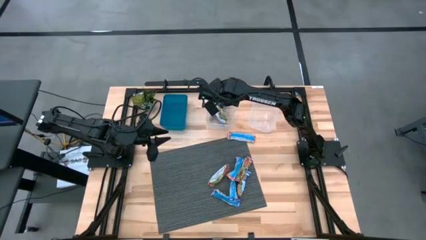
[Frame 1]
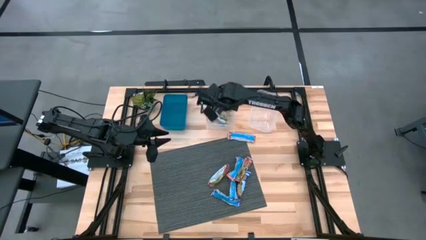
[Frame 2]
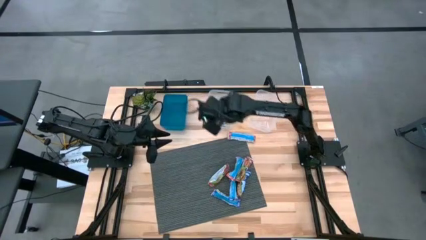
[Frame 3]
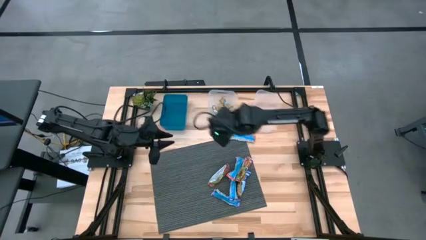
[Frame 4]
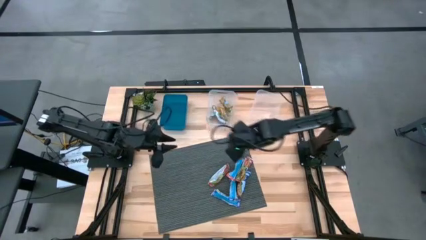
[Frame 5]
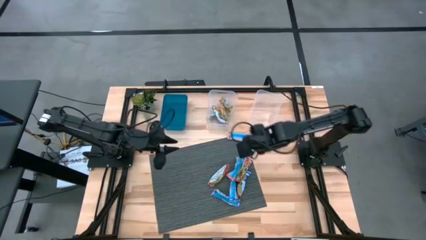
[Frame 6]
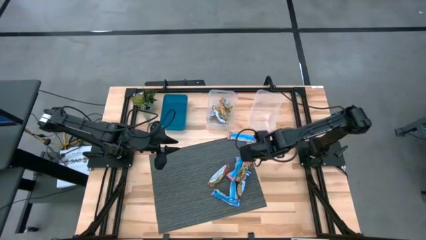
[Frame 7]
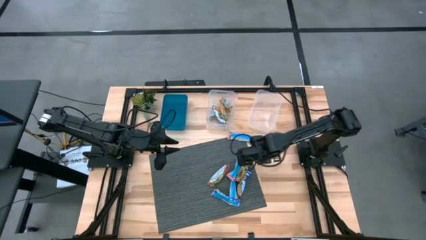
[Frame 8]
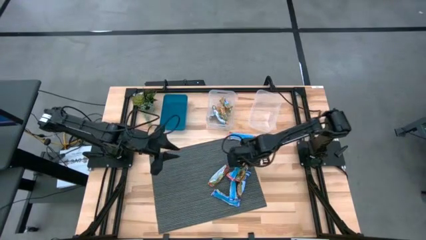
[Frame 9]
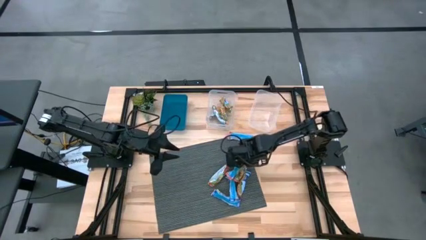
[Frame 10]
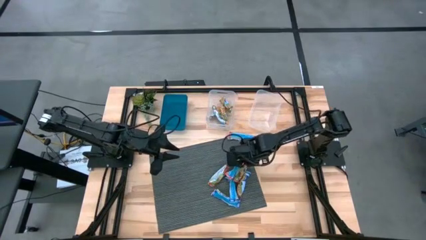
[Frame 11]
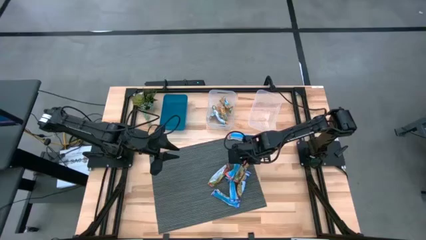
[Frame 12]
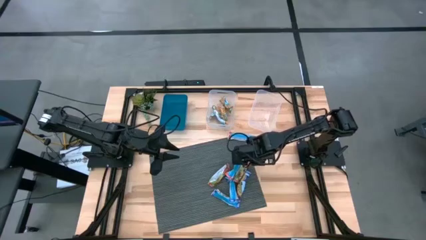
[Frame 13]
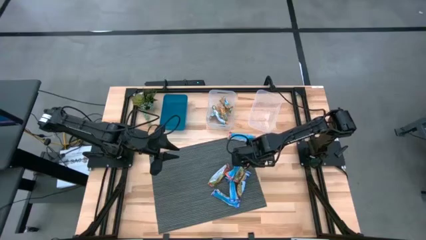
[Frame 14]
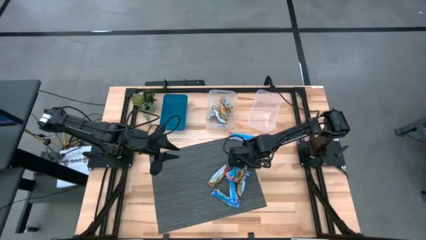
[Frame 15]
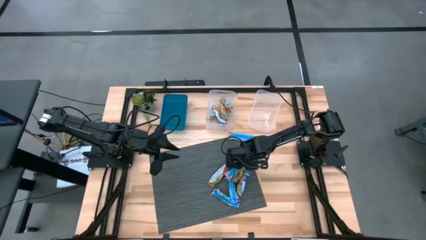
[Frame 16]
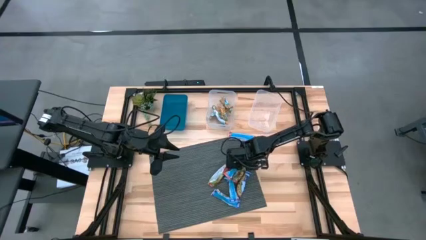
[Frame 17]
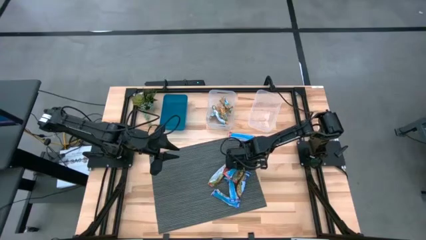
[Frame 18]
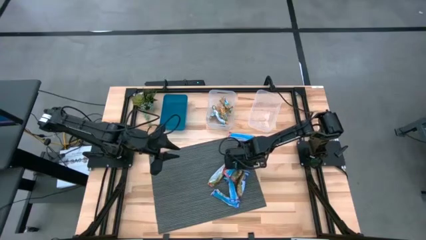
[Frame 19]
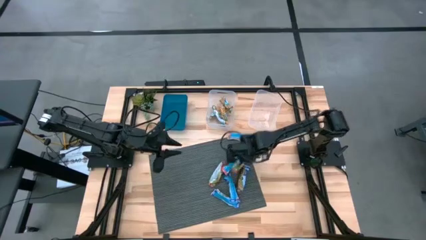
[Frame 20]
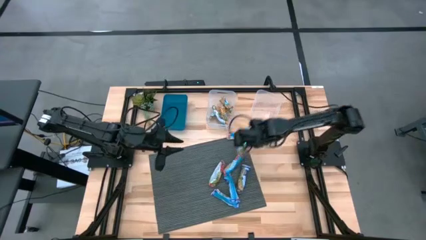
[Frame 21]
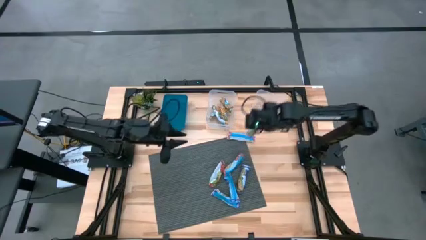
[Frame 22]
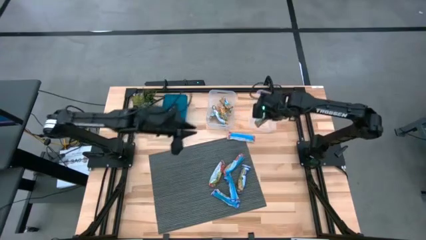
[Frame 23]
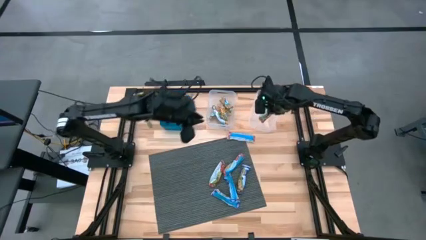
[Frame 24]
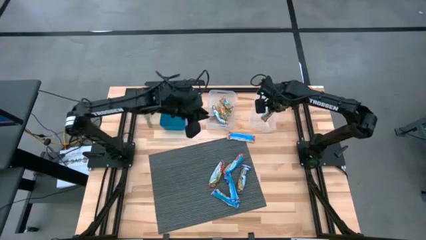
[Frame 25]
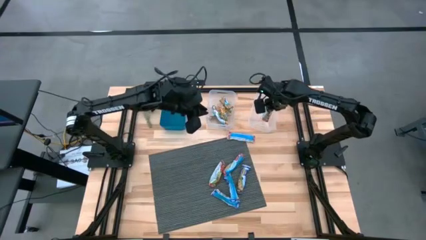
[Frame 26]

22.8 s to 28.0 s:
Task: Pick and place Granola Bars by type
Put the red granola bar into the right transparent bin

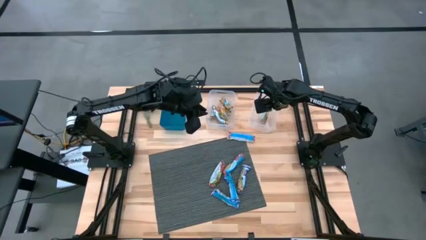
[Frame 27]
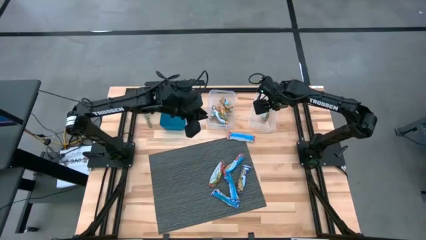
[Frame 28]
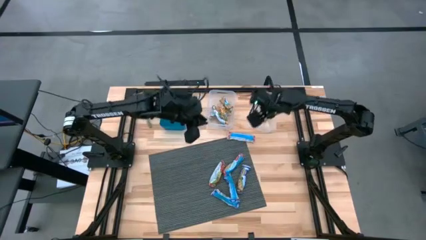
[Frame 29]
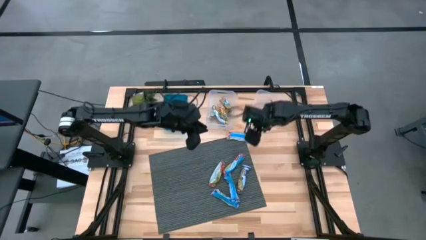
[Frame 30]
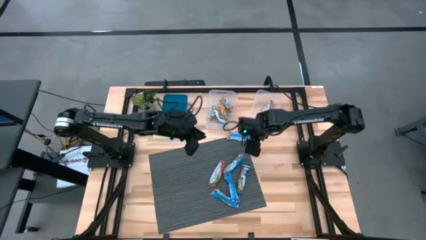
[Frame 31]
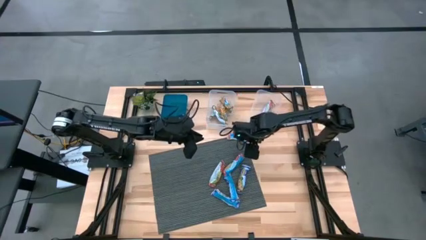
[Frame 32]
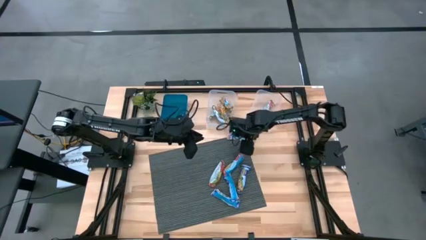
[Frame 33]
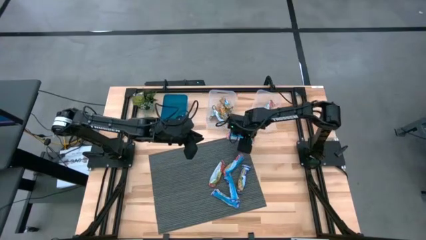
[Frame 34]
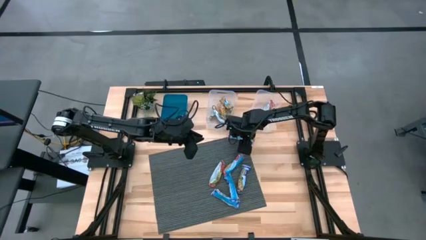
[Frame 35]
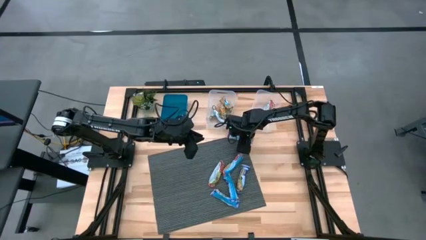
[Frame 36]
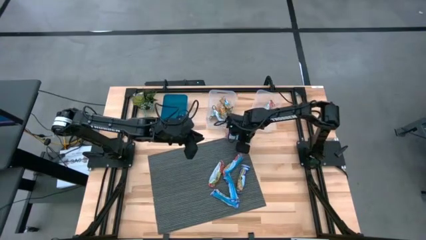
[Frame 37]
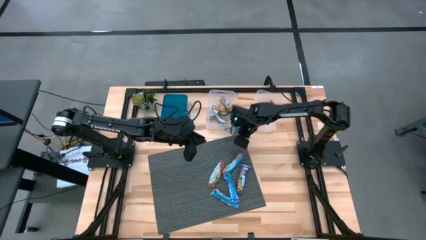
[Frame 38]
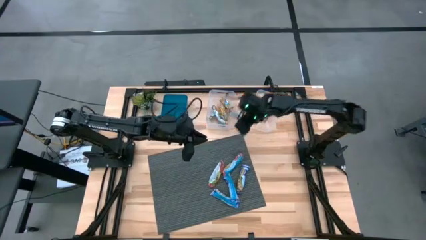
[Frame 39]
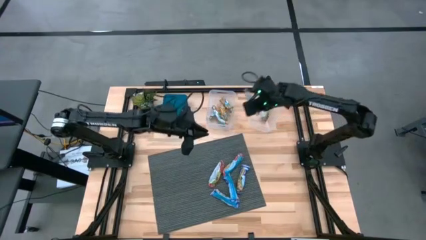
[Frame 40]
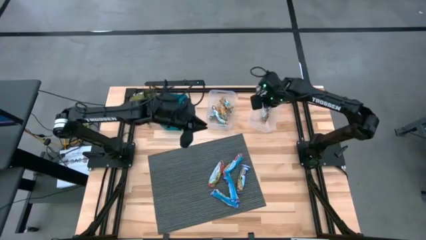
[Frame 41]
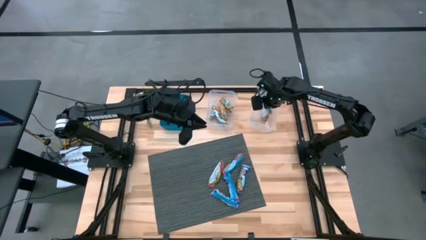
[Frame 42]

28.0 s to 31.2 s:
Put the red granola bar into the right transparent bin

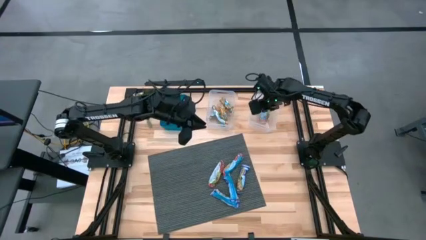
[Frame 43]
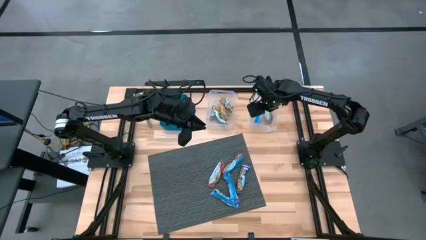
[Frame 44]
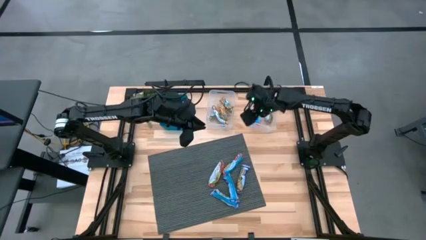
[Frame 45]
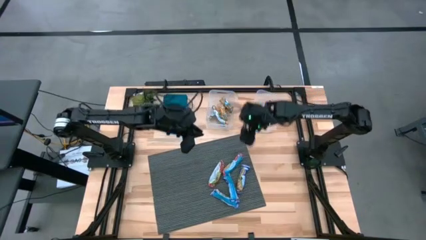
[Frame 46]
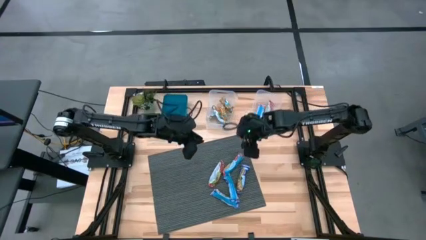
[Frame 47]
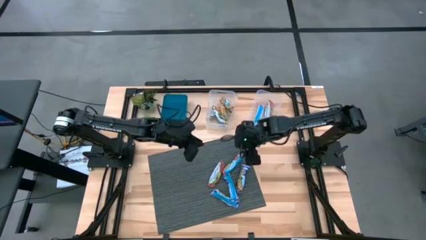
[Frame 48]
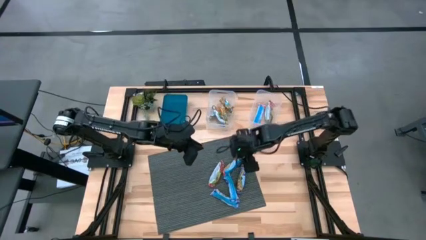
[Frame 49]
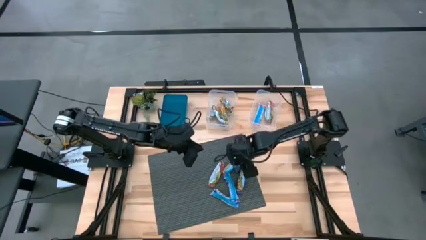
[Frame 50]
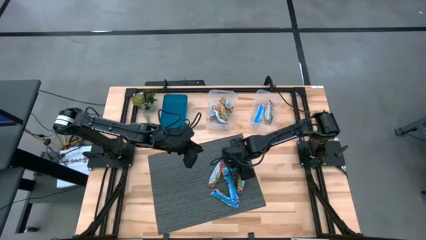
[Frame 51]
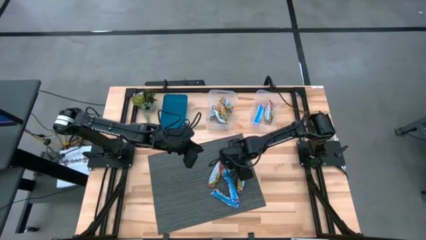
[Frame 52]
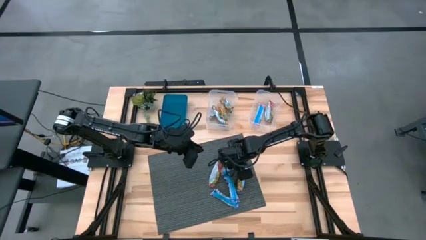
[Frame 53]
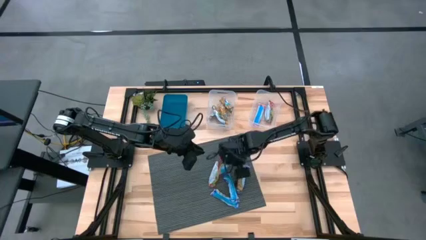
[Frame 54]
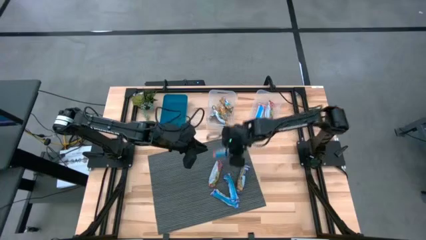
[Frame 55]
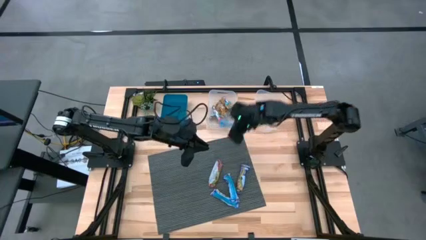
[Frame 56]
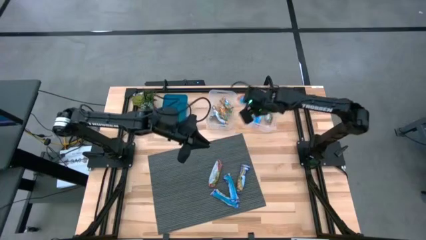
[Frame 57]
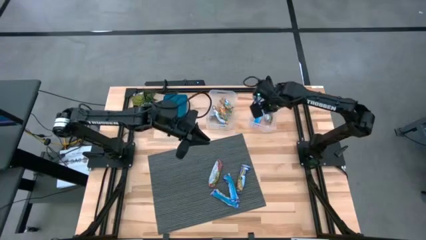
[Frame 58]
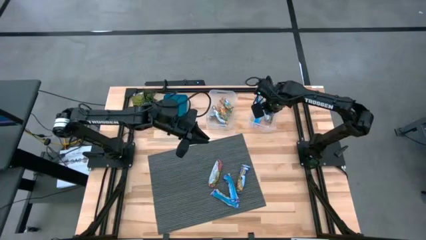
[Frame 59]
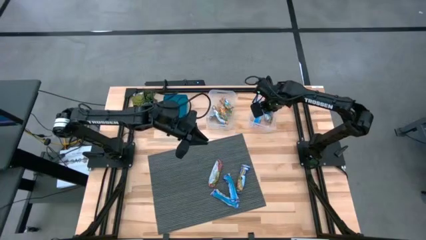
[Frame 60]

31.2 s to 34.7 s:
Put the red granola bar into the right transparent bin

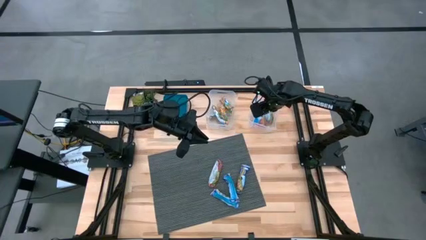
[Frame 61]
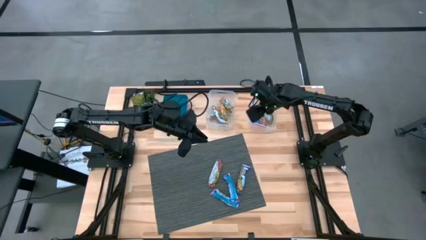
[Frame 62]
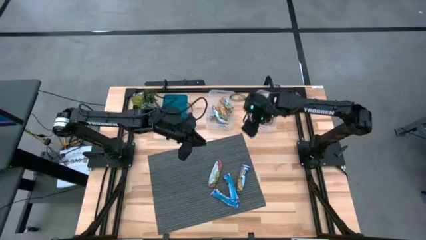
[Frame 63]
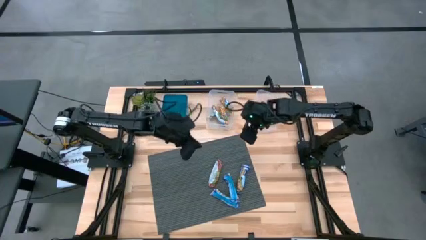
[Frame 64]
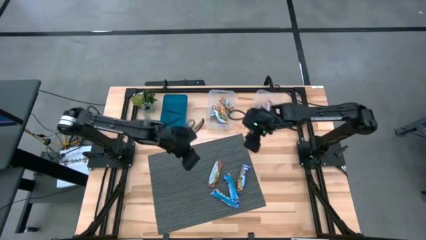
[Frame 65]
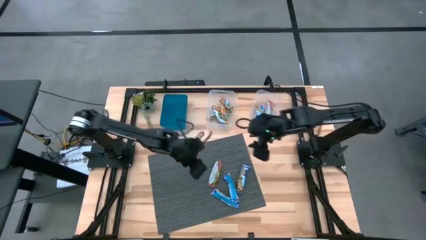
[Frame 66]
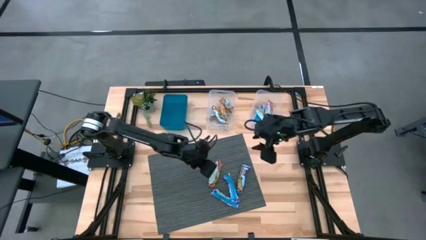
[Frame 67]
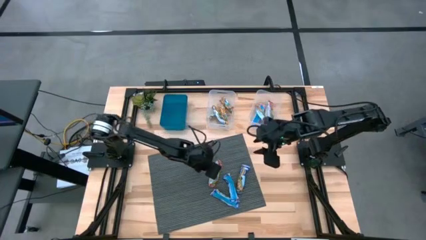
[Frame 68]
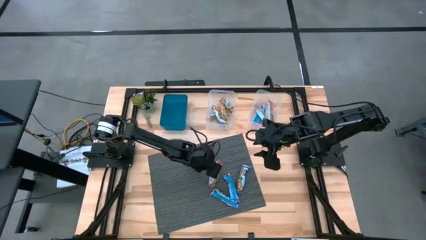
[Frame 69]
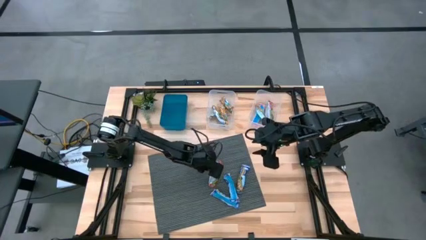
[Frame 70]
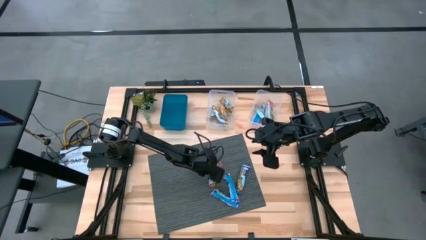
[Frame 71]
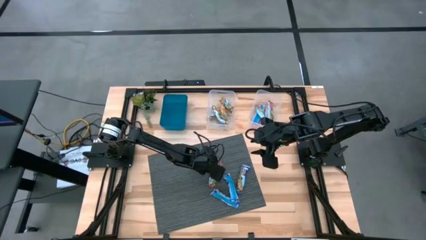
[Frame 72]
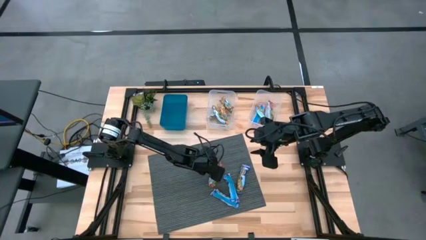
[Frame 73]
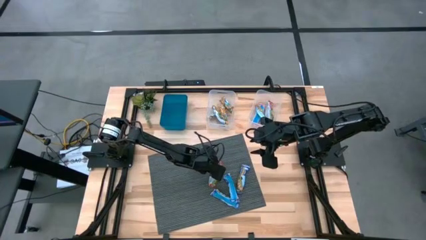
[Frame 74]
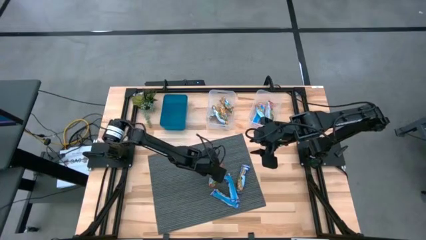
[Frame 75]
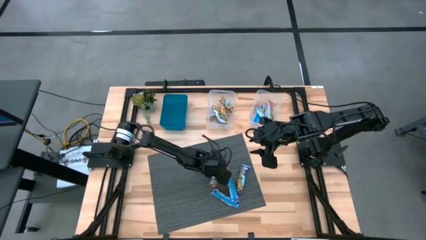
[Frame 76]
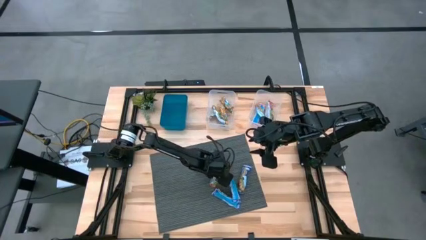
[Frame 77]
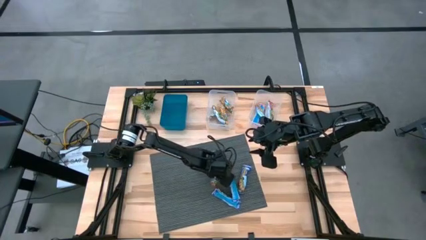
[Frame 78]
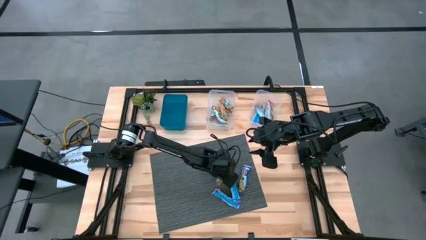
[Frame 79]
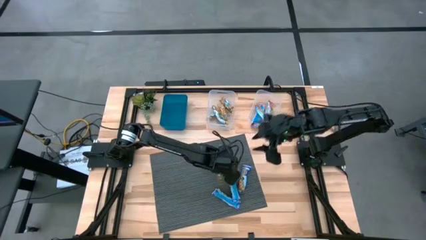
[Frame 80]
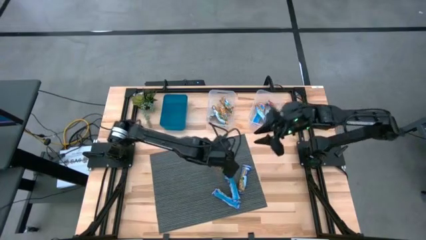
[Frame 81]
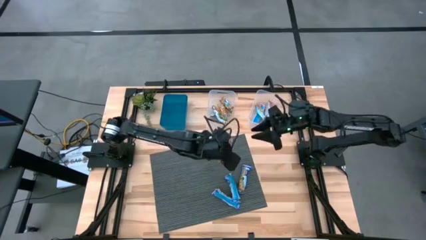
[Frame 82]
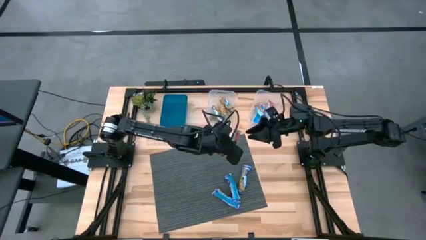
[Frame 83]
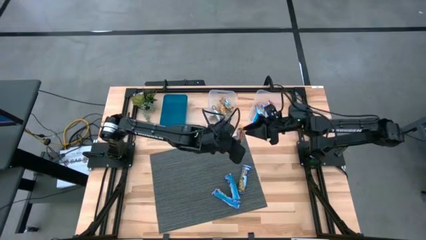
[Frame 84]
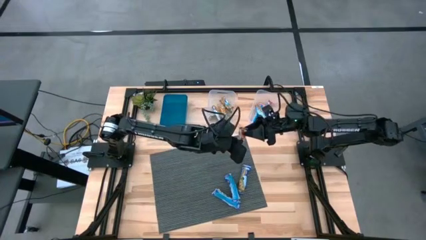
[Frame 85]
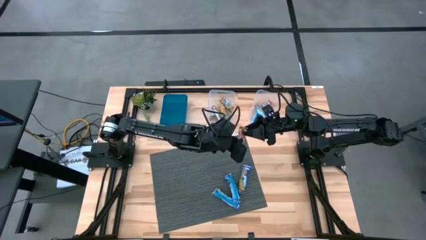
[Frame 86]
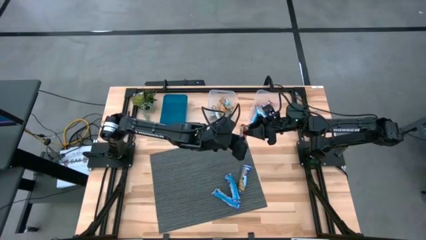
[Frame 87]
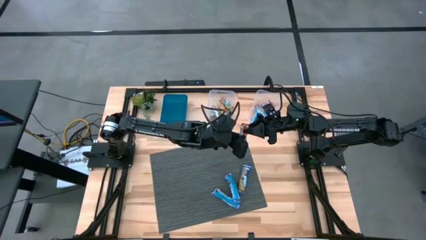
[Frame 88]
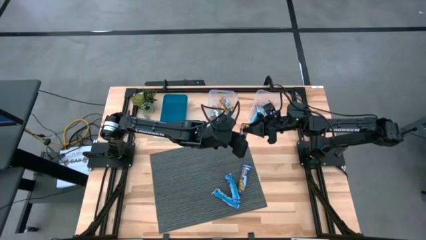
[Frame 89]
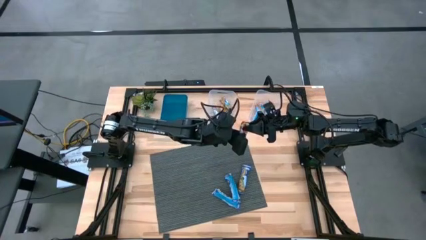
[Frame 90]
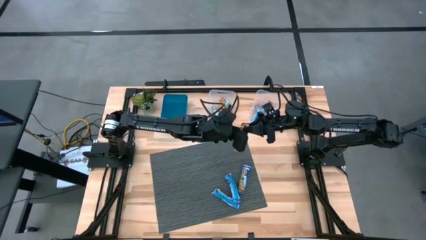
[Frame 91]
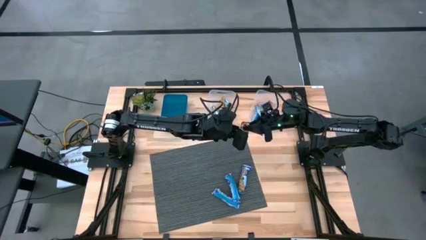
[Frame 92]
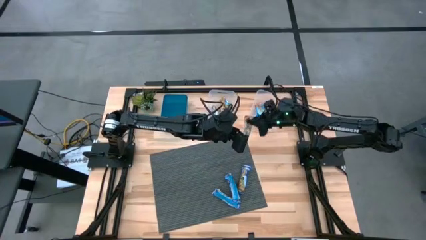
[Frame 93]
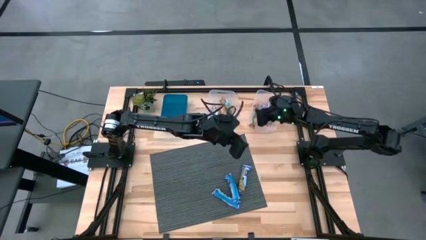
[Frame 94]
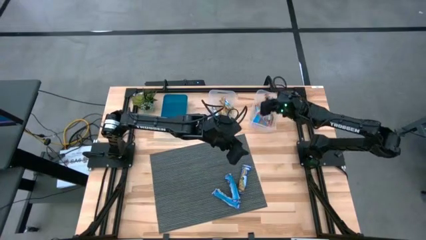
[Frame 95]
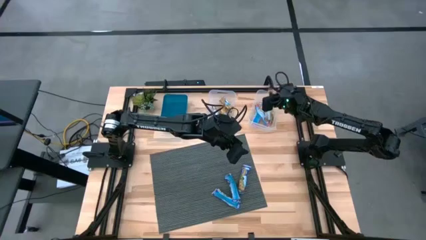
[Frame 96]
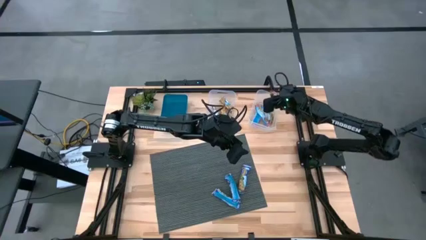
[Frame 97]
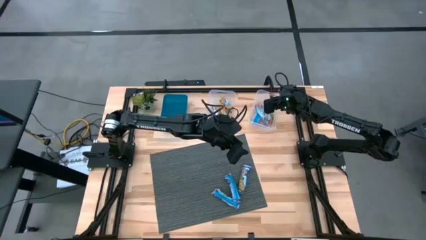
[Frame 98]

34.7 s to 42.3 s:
Put the red granola bar into the right transparent bin
